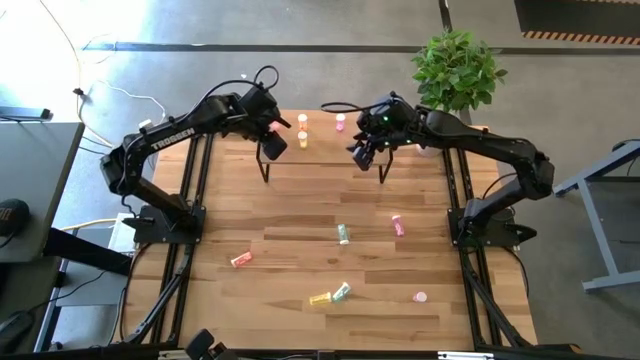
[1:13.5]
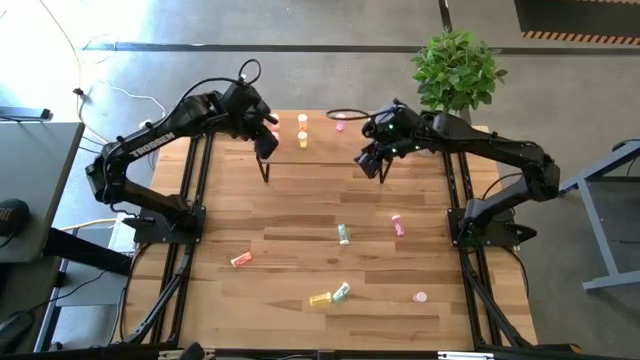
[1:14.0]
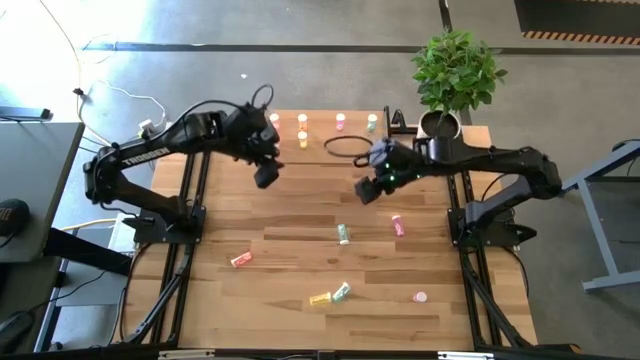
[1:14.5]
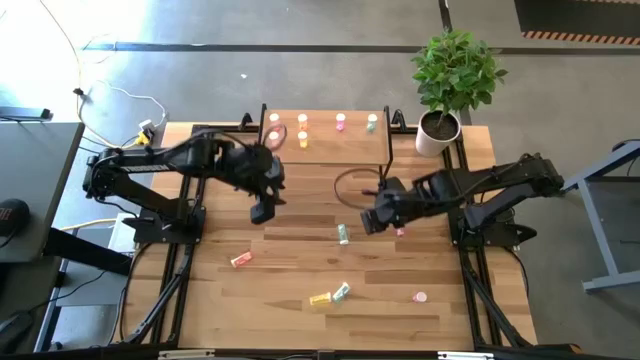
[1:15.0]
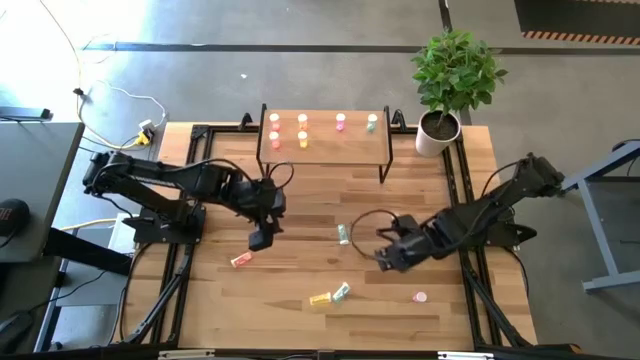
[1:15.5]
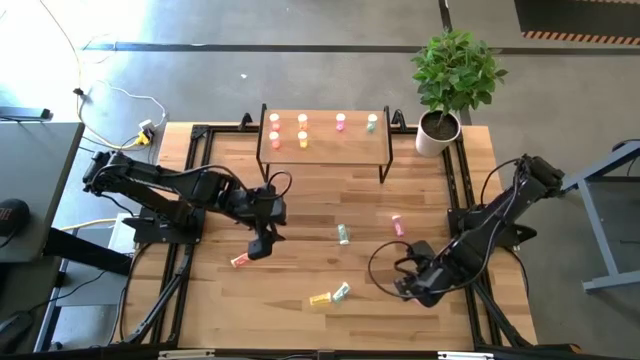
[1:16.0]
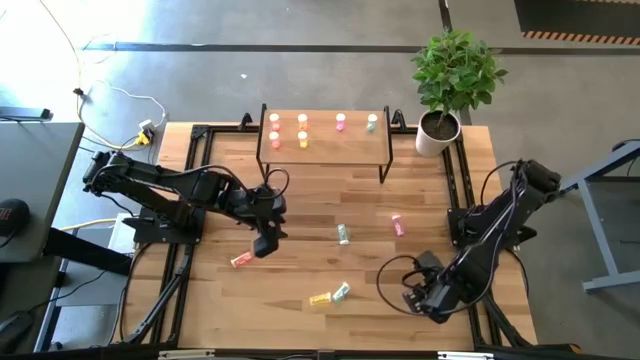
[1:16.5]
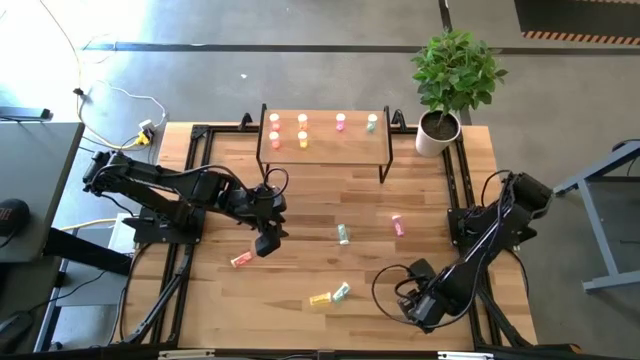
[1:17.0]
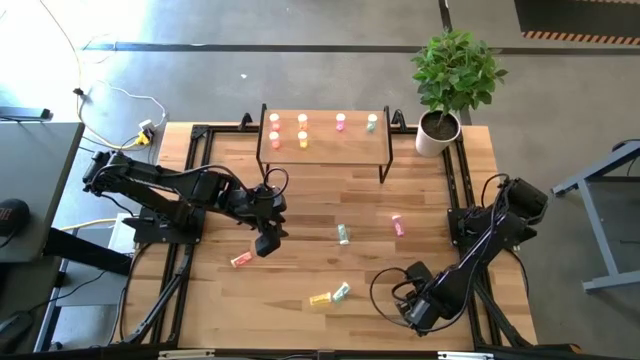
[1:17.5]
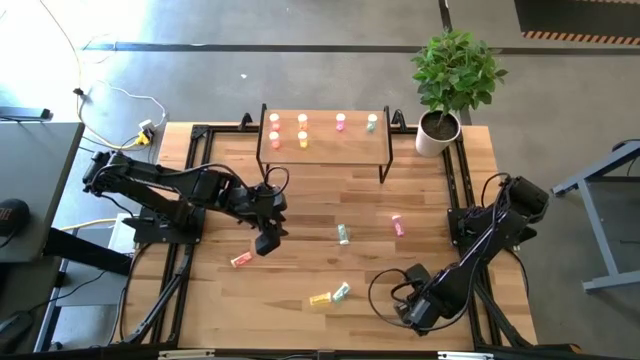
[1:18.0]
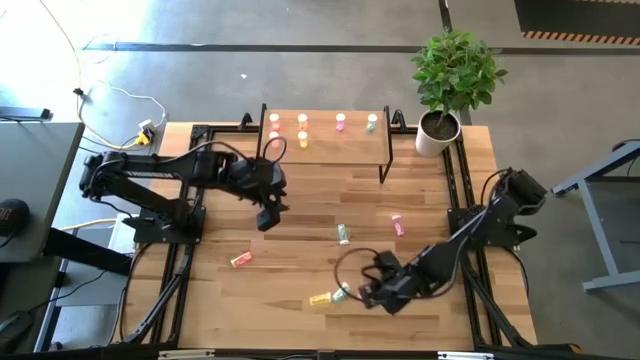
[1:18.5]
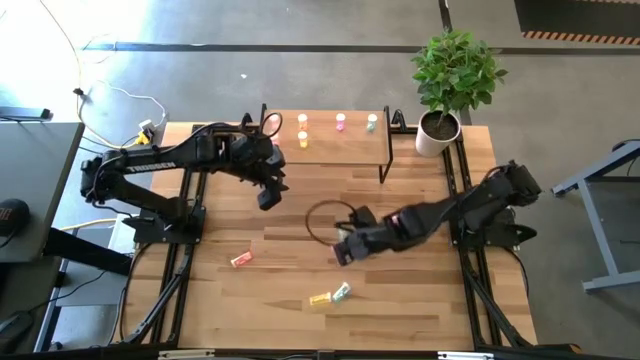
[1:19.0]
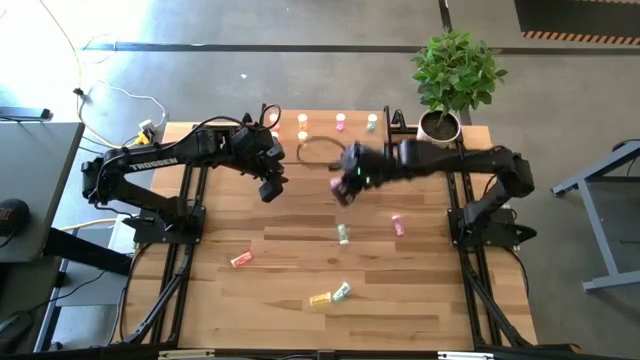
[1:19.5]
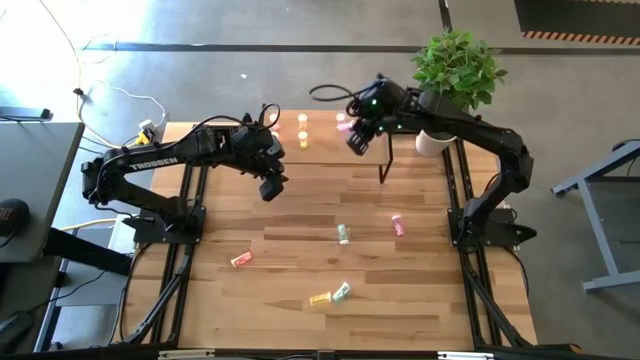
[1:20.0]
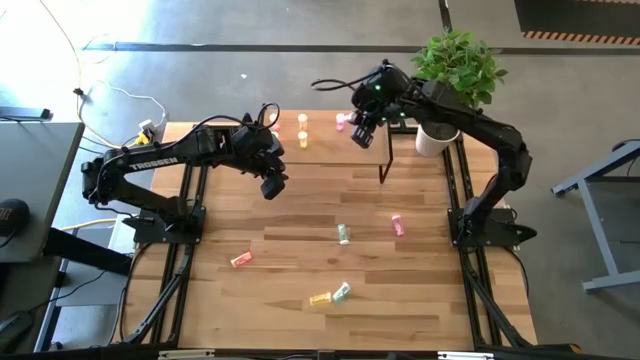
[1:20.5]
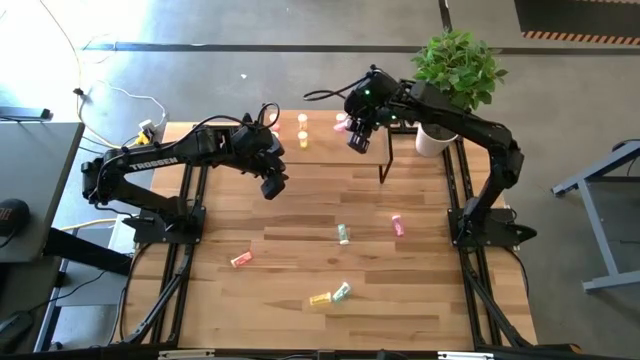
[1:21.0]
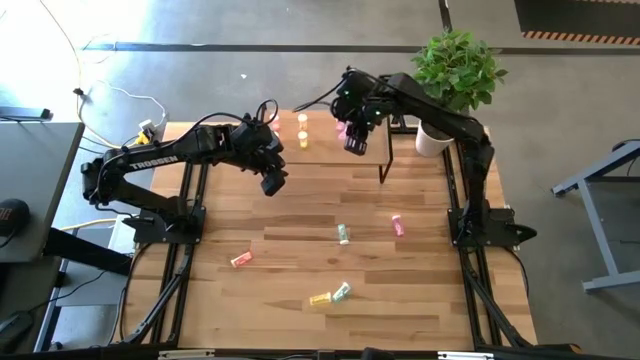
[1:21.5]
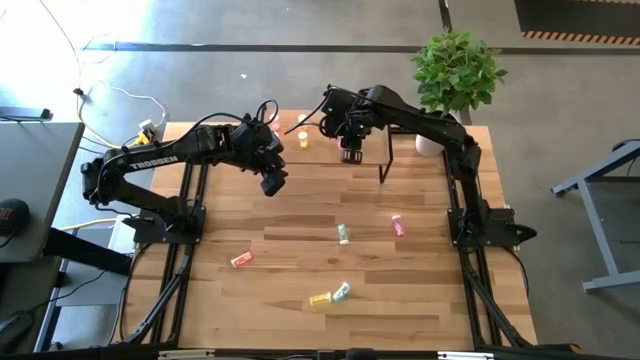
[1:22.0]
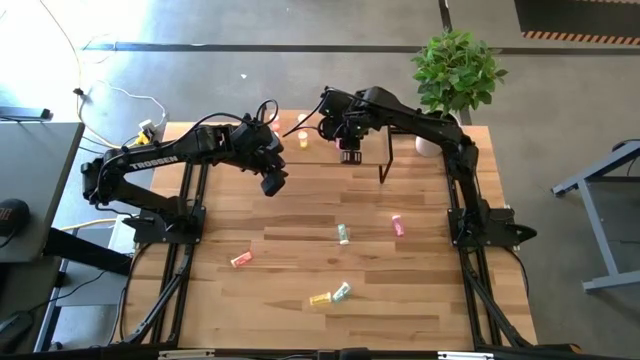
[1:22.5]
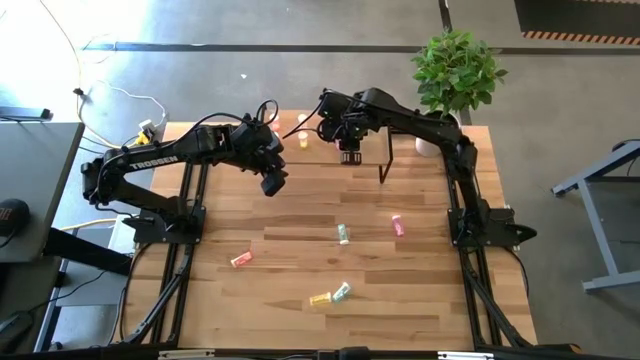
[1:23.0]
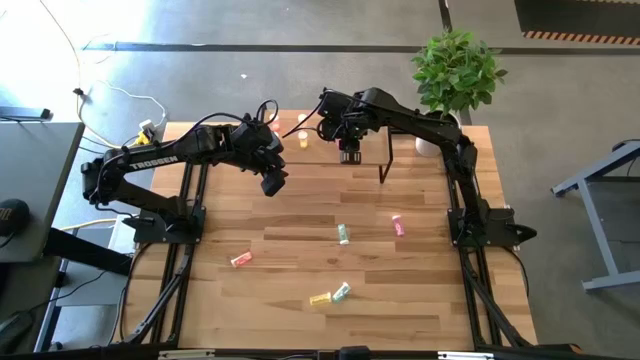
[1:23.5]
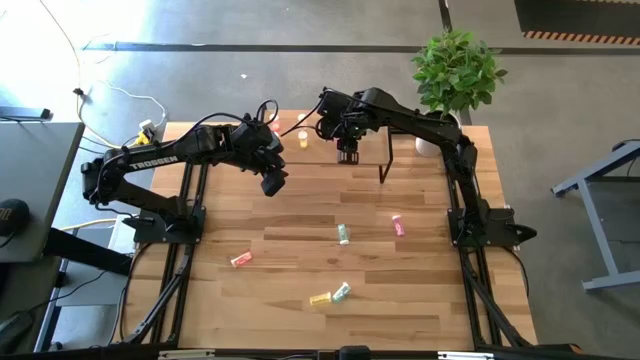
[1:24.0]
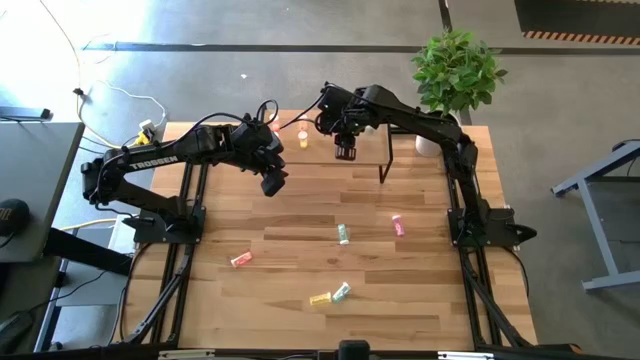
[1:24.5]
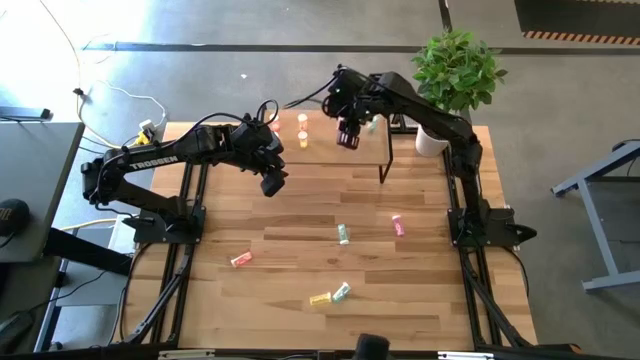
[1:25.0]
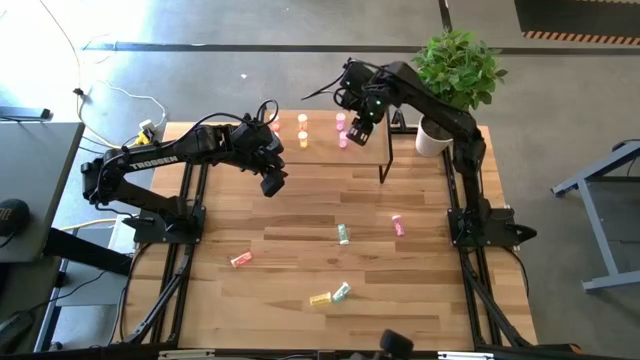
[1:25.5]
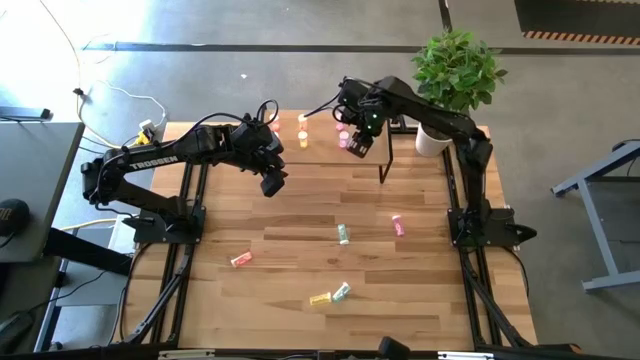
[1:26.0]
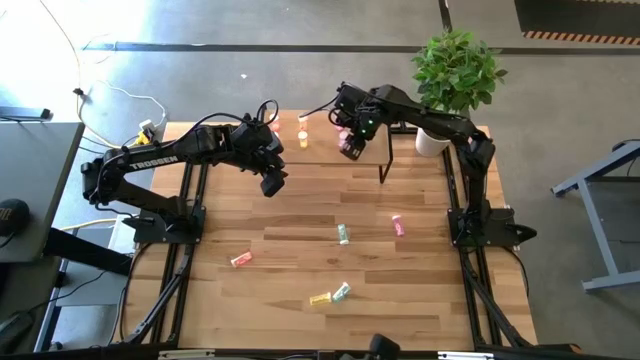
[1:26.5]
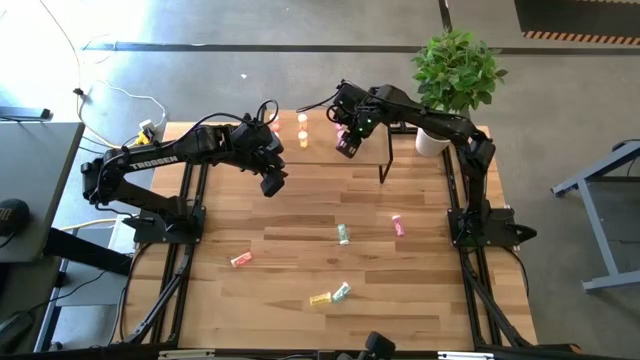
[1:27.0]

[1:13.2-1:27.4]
Task: Pick and place medicine bottles onto shelf by color
Put the bottom violet pill bottle on the shelf aligned with the other violet pill bottle

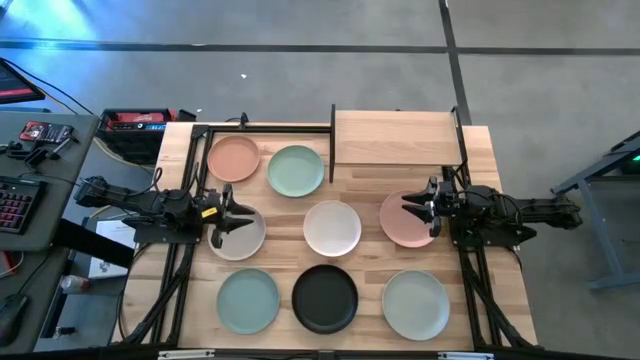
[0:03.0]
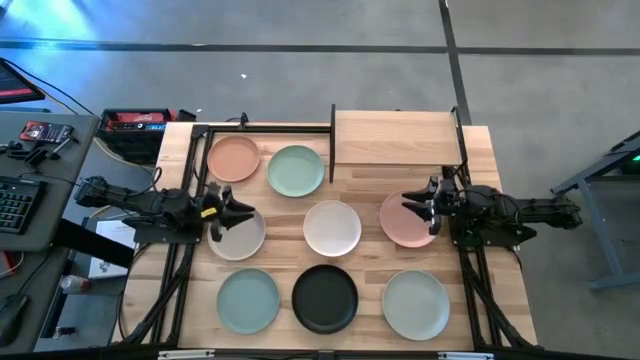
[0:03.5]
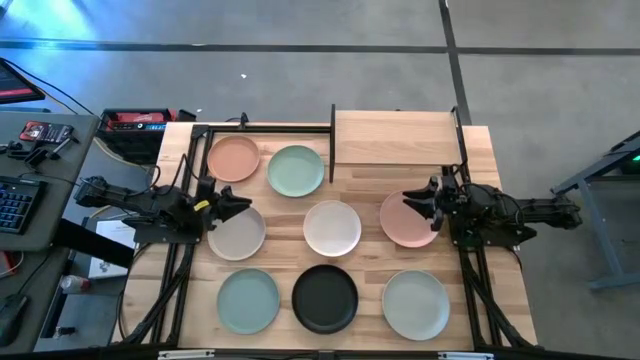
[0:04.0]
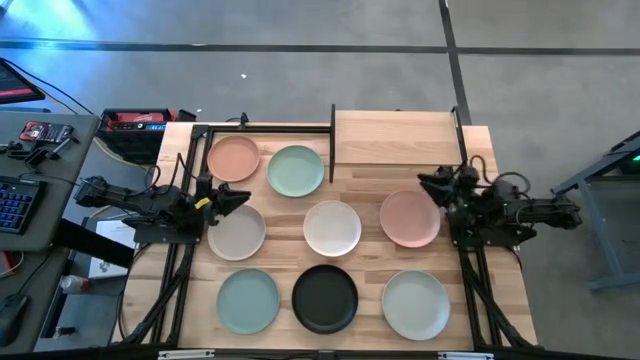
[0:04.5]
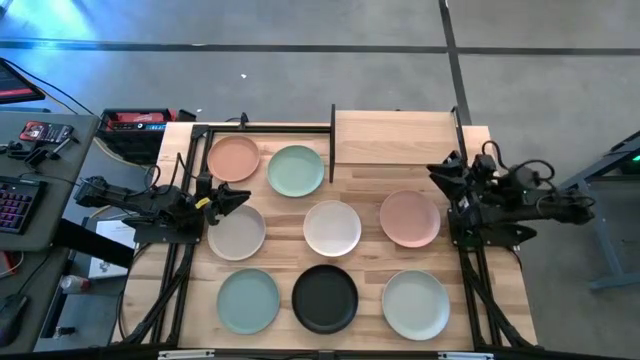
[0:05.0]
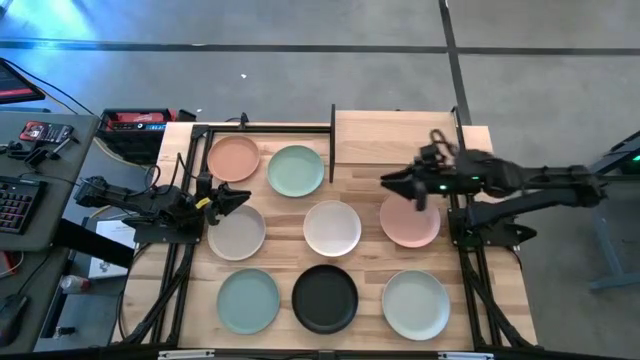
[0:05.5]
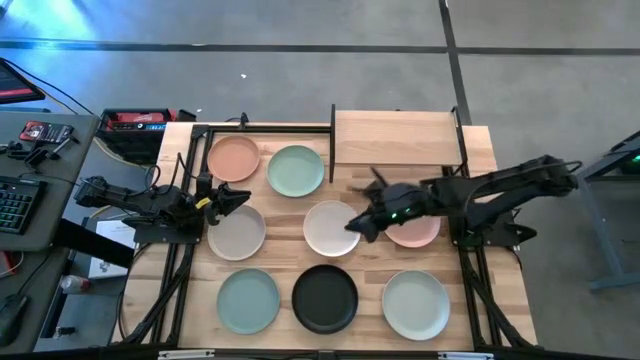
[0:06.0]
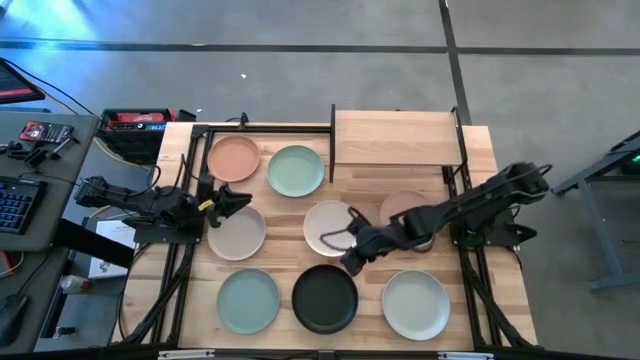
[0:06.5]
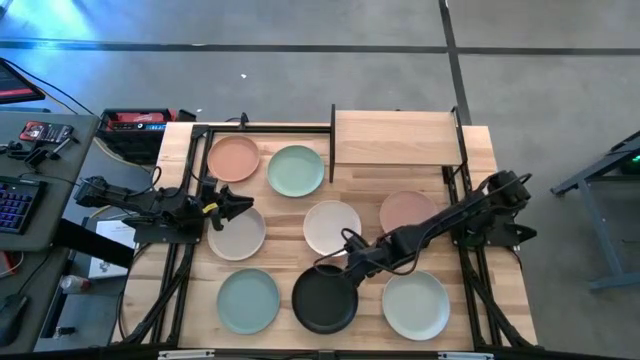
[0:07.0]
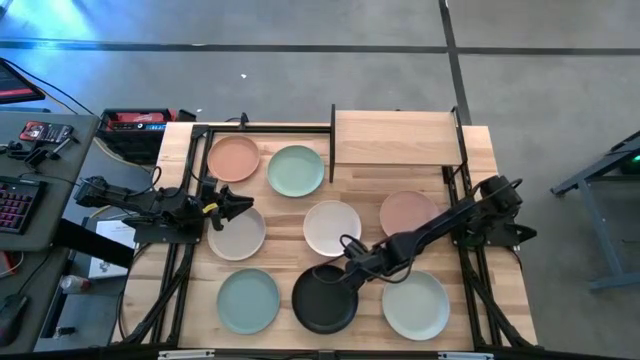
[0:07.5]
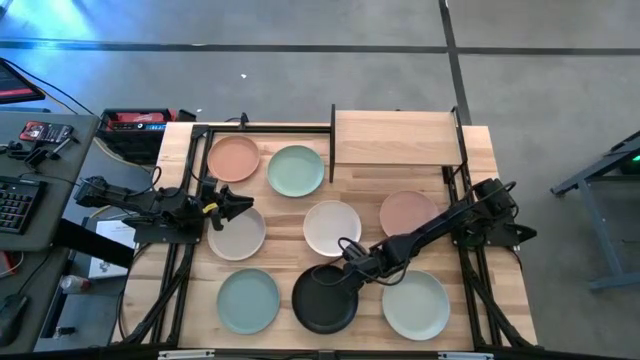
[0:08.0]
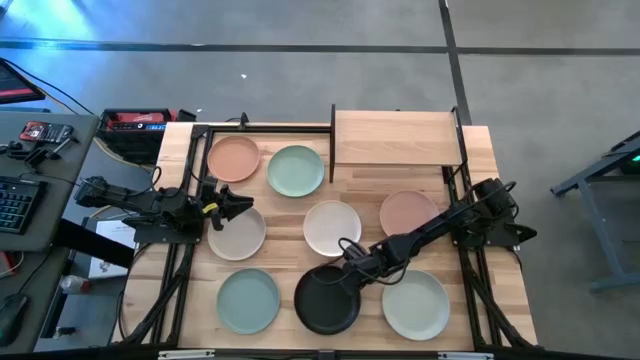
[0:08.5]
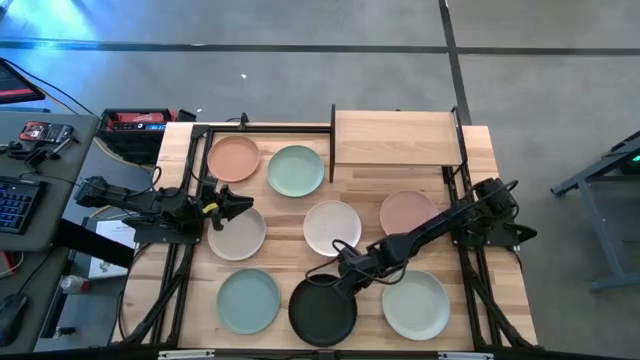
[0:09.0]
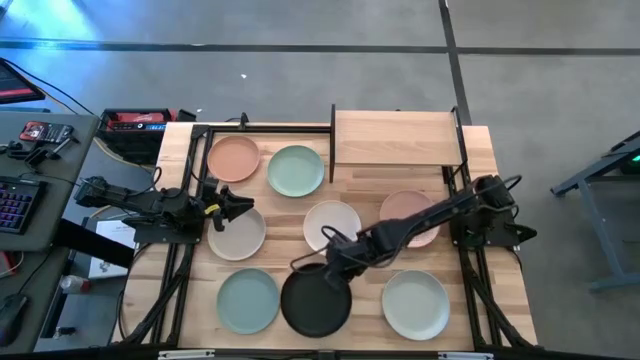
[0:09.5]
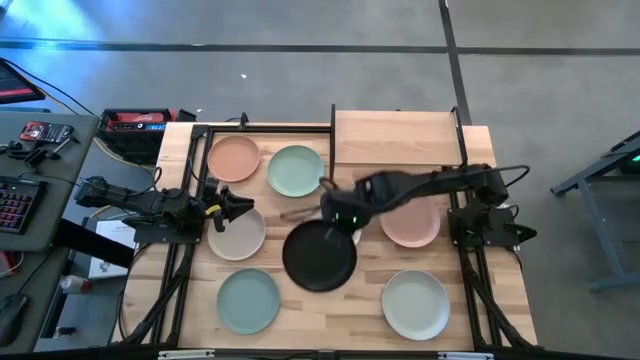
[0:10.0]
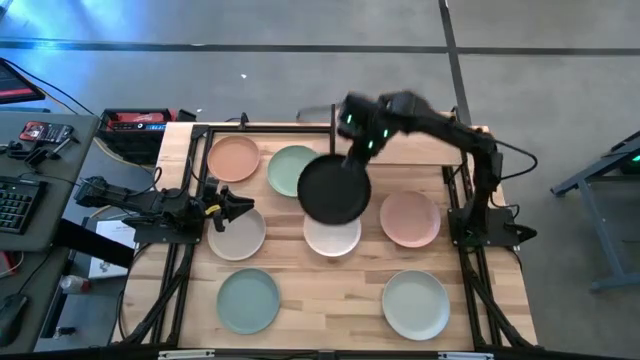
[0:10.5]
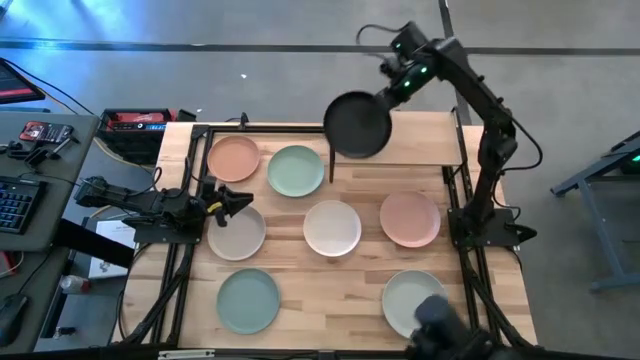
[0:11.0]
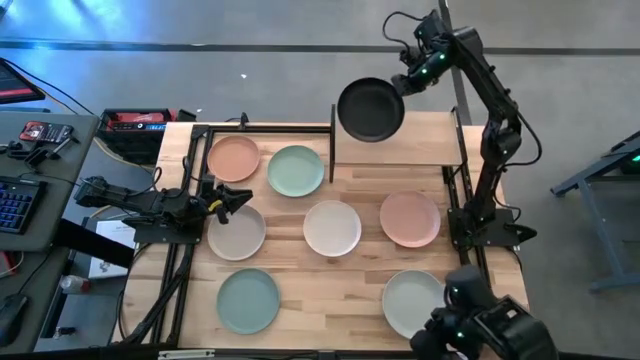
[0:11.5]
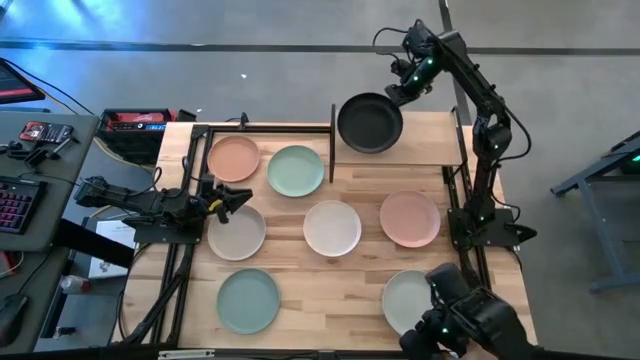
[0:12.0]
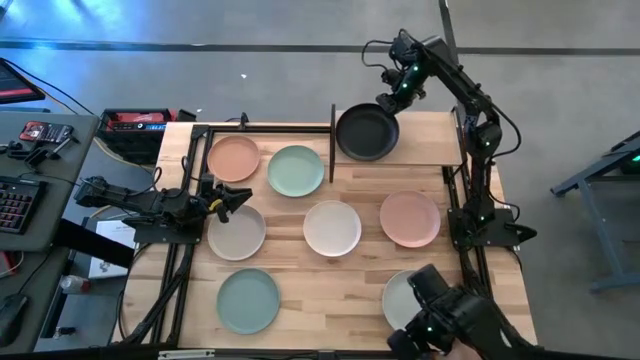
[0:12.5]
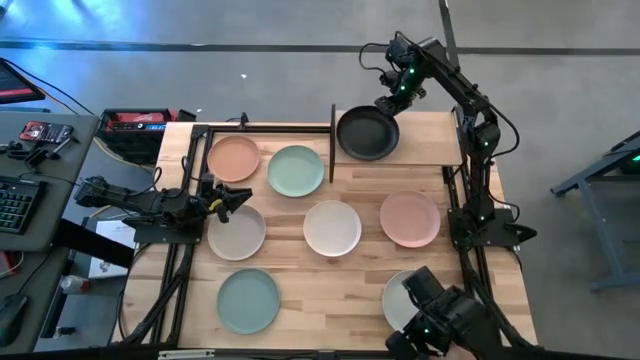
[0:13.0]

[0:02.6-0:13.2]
Task: Place and stack plates onto a shelf
Put the black plate on the shelf
